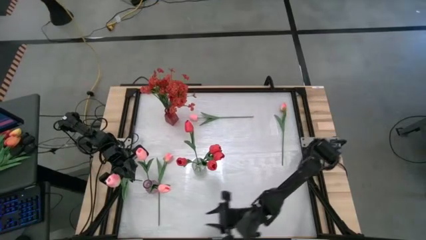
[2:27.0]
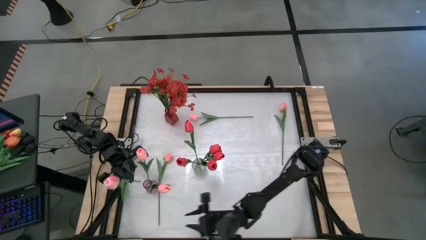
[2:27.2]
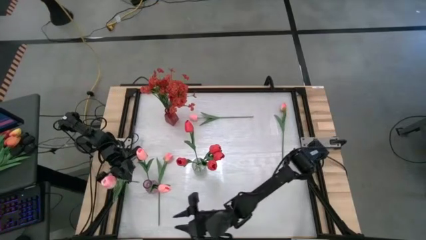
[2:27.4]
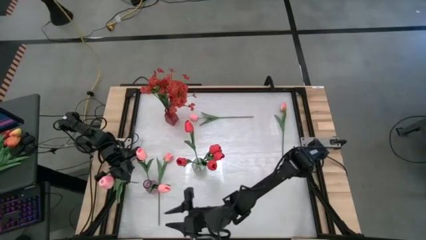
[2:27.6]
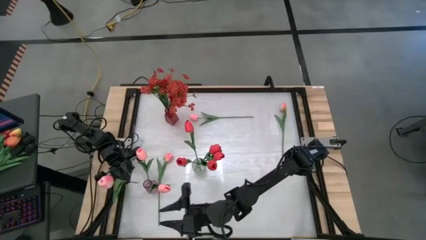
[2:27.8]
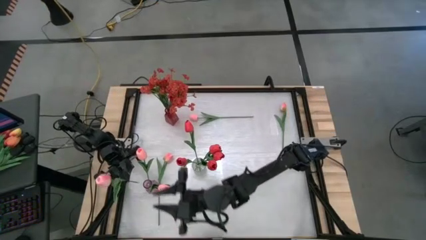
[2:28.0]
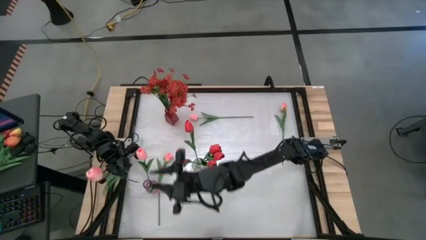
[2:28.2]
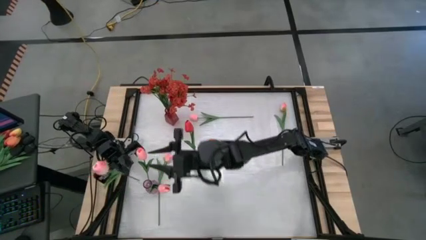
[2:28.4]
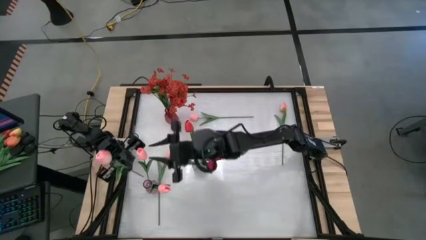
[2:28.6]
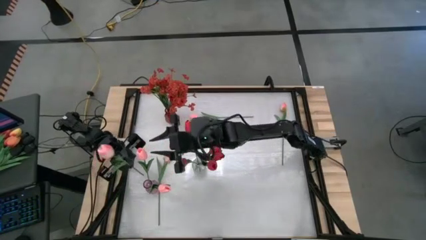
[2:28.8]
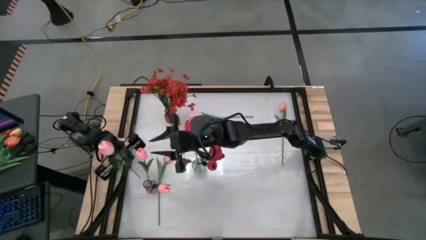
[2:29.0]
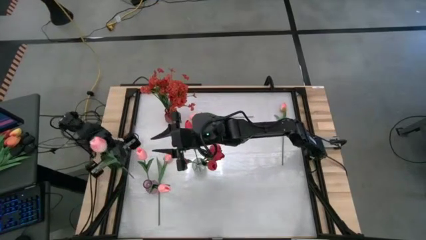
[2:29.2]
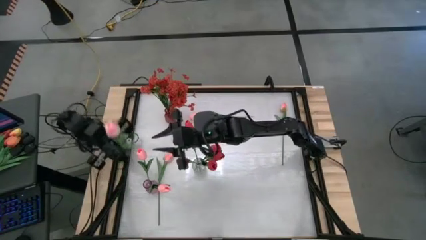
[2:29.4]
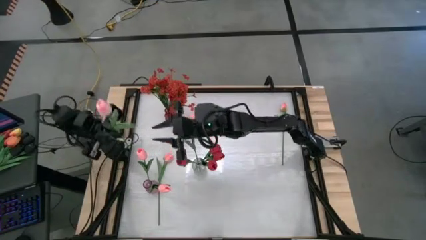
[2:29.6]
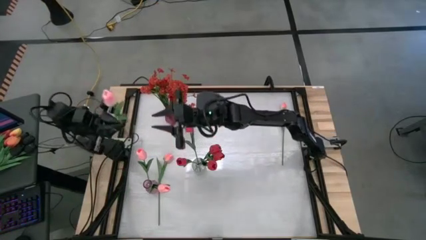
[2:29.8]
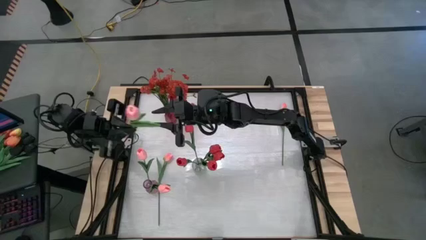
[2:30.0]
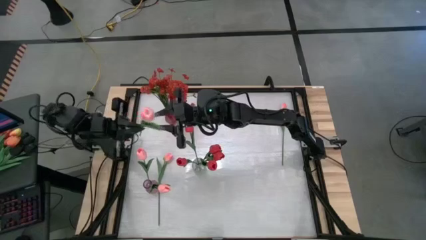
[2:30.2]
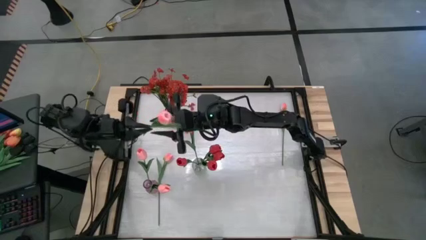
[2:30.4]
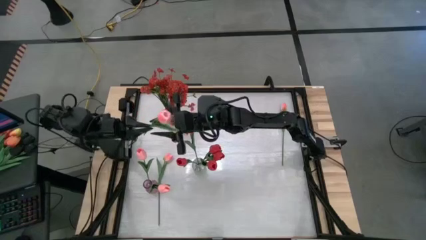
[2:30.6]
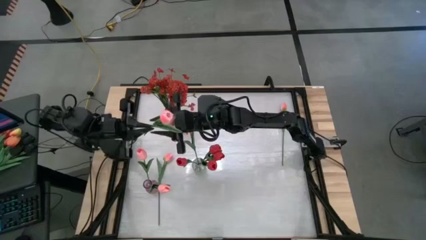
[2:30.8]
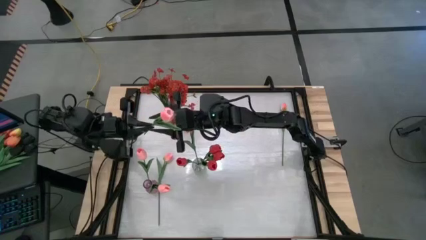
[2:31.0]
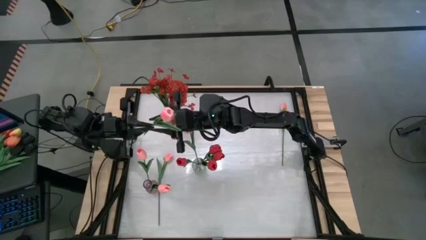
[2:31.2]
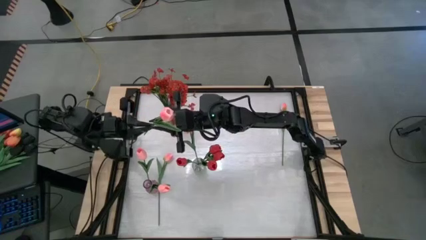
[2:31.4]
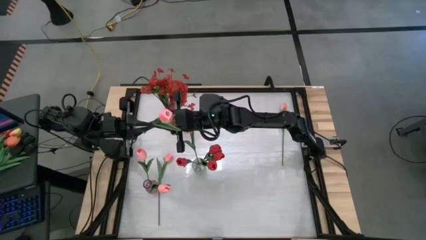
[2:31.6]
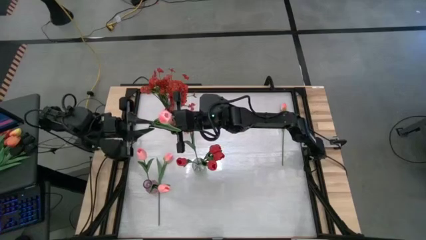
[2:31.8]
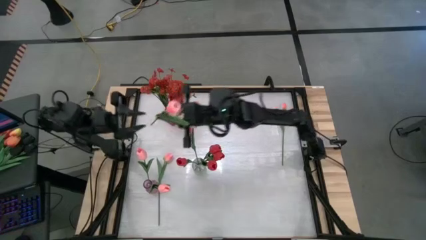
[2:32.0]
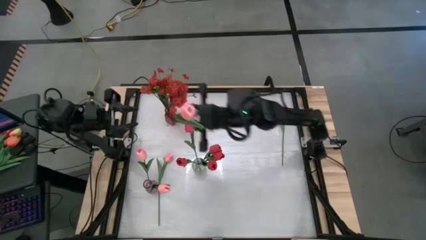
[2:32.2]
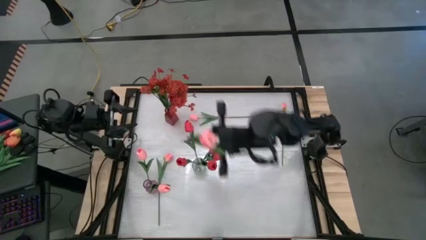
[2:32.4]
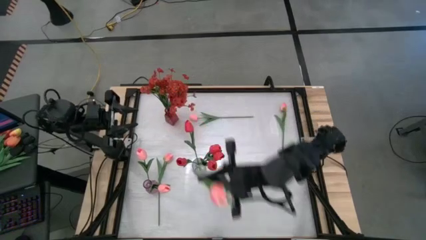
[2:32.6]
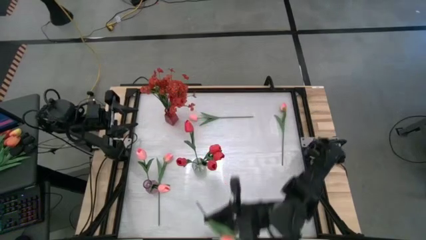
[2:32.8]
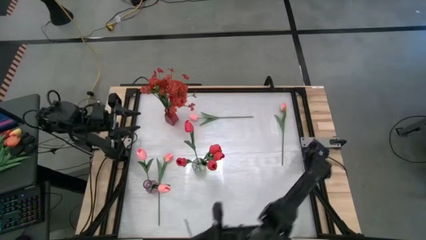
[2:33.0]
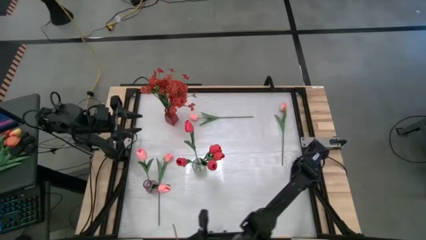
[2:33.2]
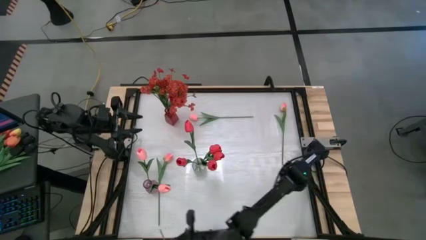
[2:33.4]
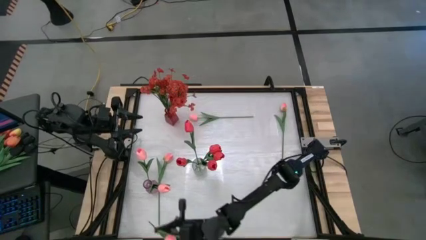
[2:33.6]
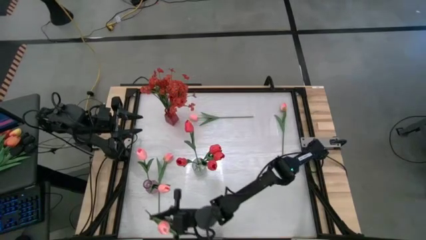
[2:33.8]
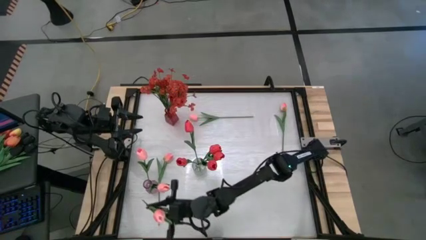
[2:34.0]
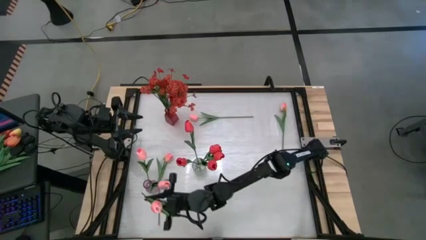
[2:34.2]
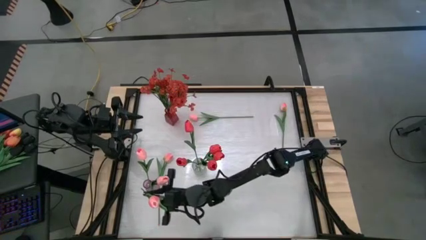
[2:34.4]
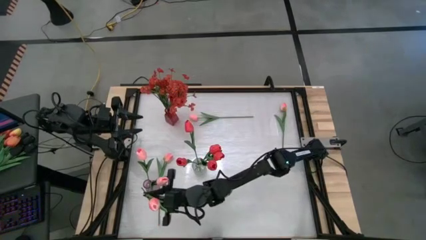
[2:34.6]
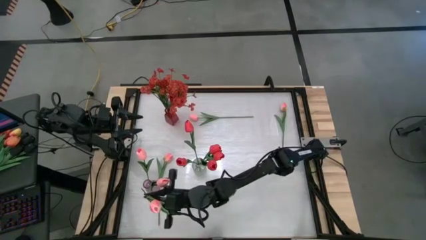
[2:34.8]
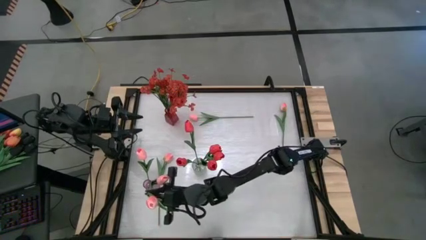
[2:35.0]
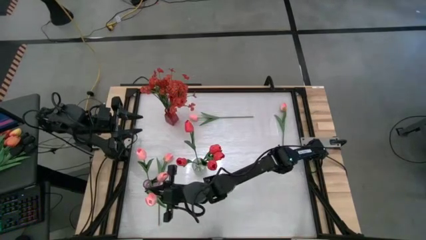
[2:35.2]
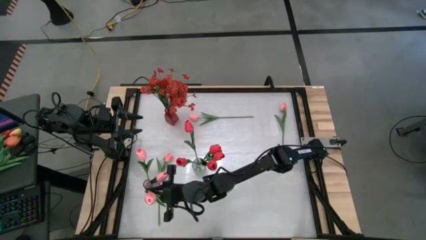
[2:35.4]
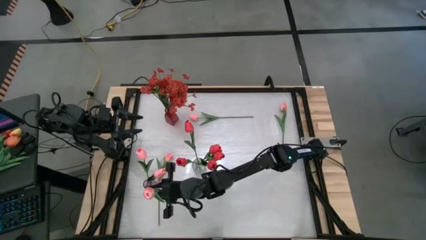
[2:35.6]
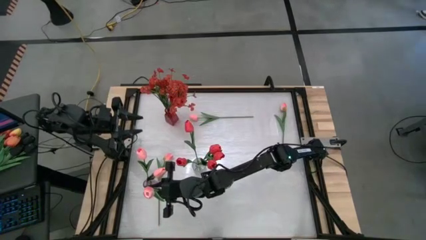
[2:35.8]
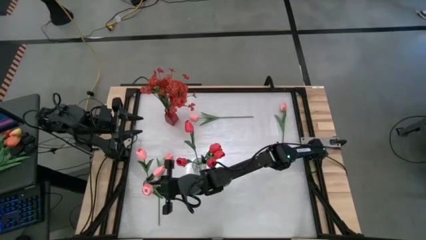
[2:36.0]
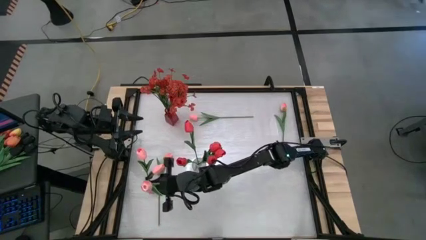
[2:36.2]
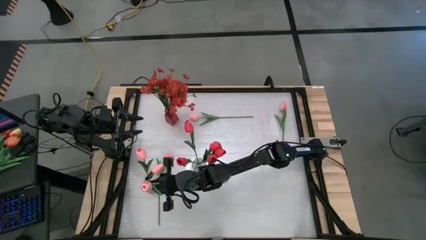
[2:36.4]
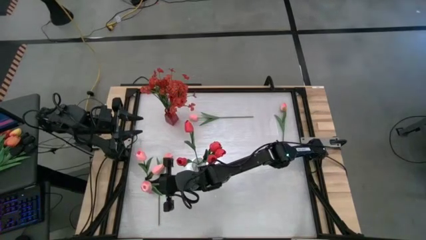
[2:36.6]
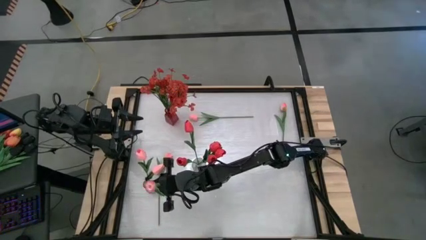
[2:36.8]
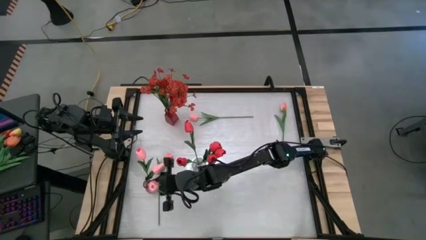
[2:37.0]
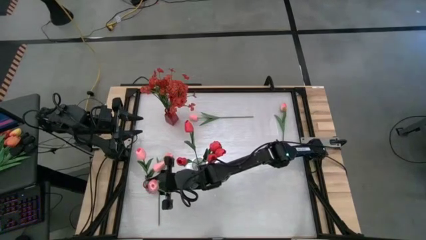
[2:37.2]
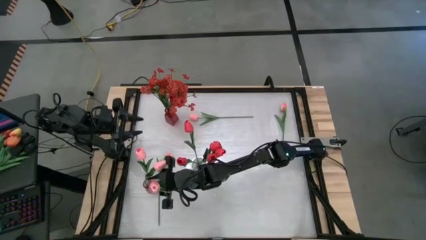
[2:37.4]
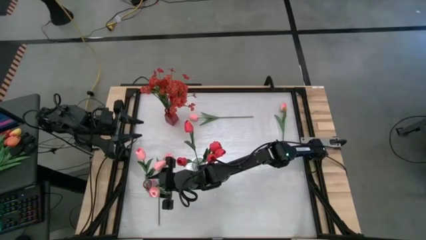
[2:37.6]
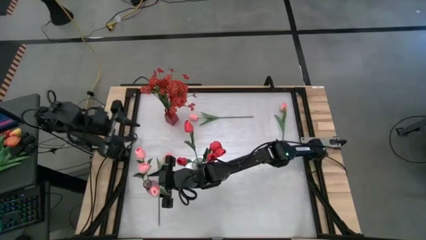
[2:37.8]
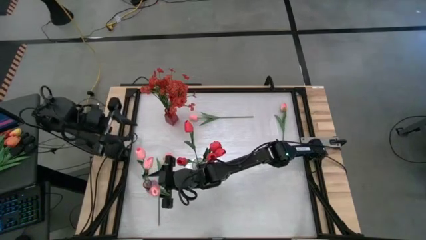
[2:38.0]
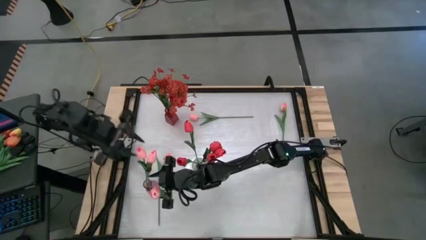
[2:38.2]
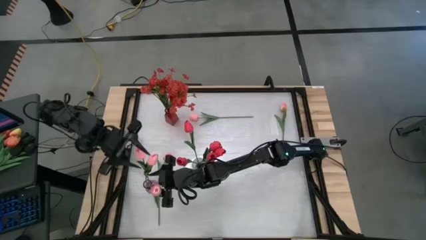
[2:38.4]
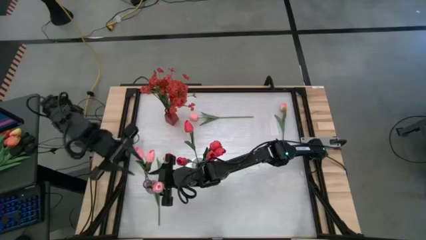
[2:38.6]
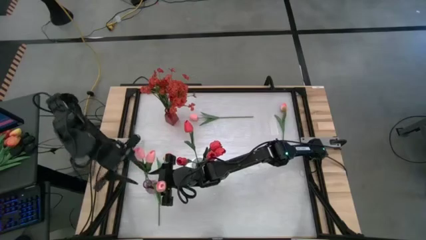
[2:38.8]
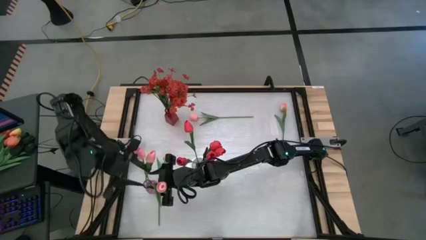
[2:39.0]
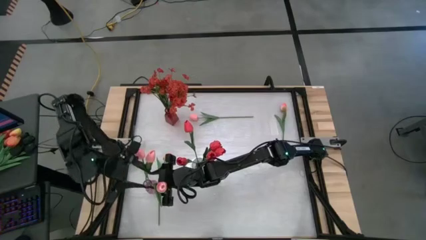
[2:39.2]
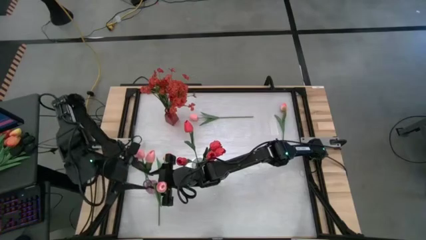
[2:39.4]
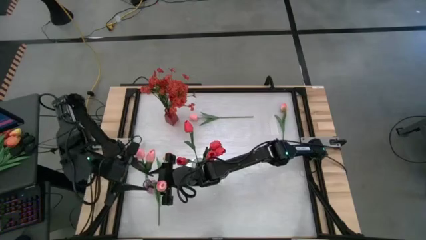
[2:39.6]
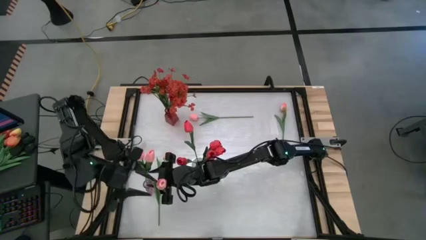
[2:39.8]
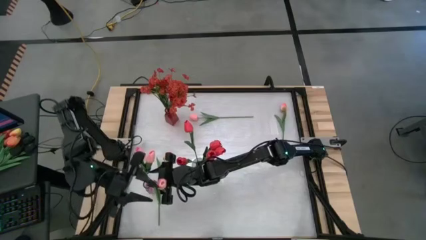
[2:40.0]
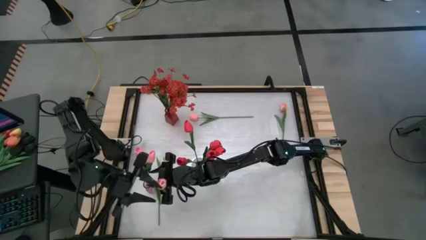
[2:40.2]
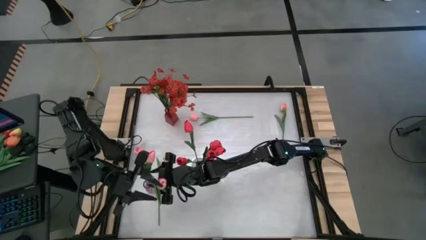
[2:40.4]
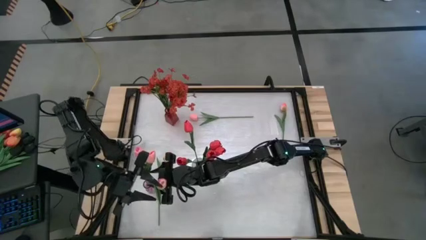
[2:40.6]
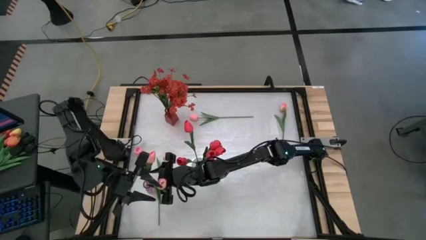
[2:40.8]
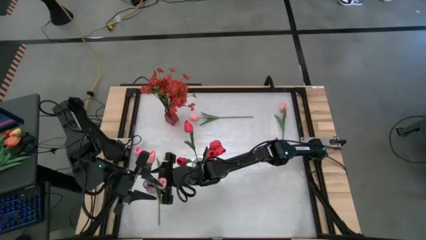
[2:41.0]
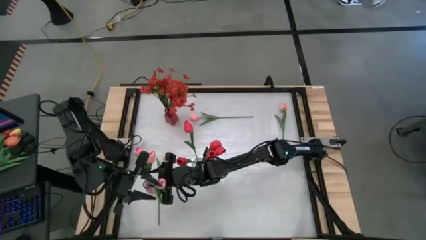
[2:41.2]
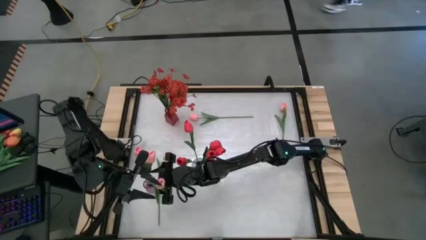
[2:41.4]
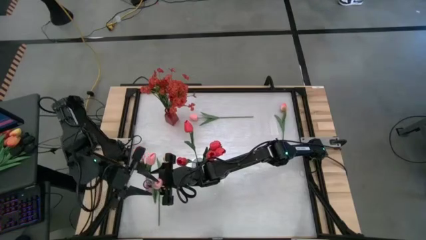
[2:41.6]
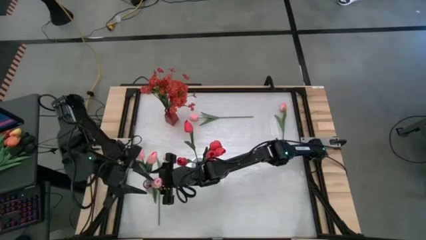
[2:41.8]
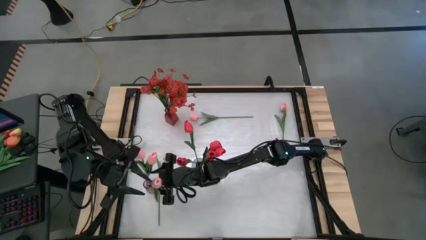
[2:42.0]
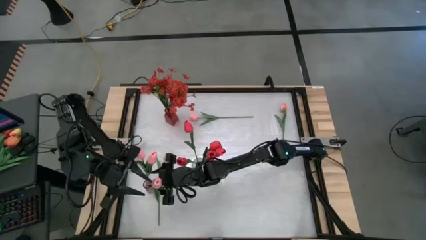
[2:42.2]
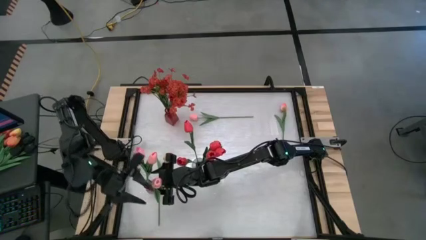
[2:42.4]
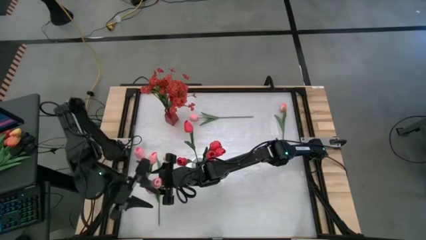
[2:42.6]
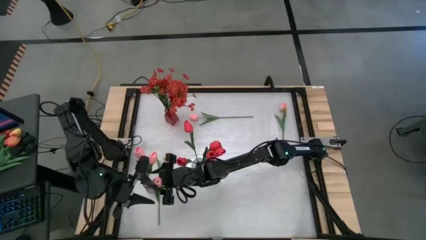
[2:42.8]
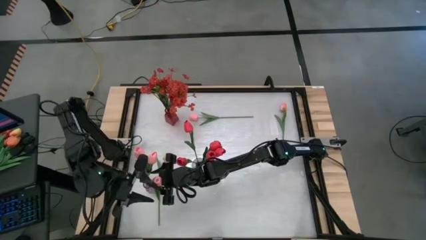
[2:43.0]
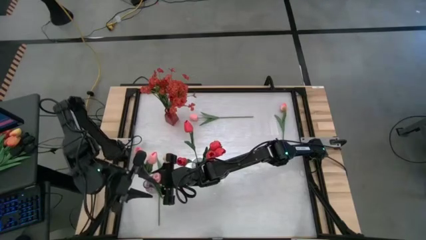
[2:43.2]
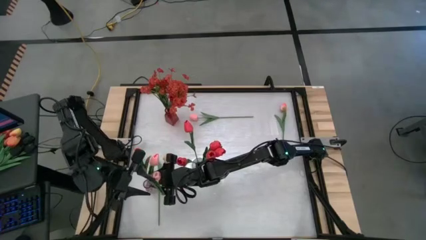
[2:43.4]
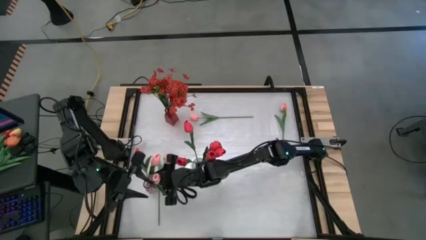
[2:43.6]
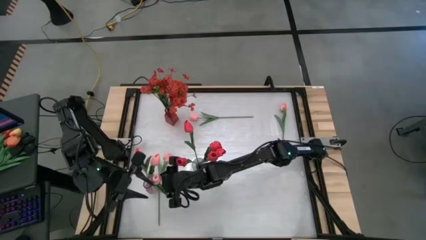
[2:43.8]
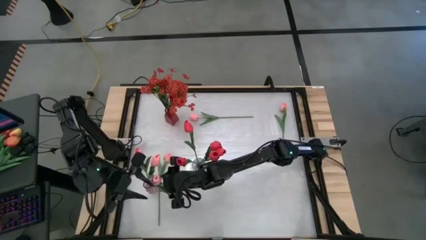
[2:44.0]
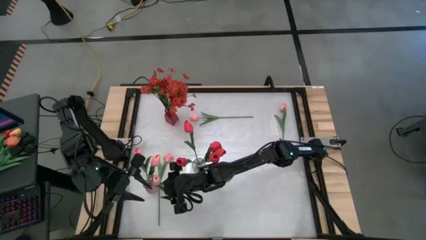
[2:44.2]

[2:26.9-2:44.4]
Task: Sort flowers into vase by color
Put the pink flower into the purple vase
